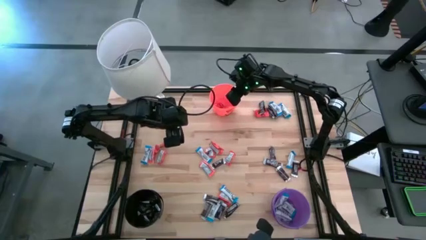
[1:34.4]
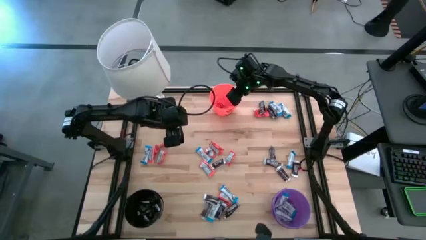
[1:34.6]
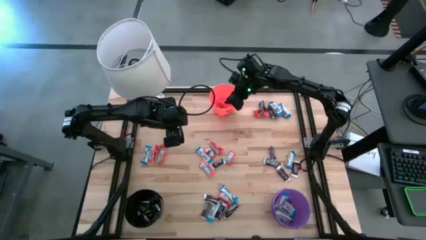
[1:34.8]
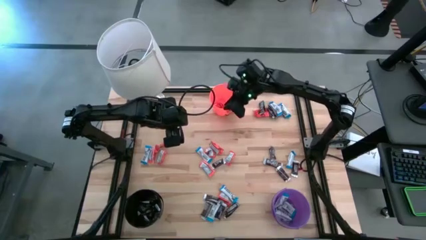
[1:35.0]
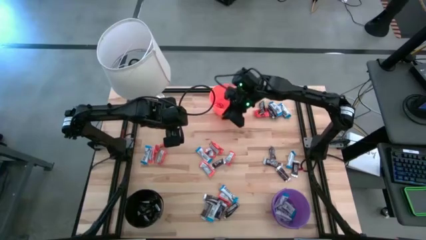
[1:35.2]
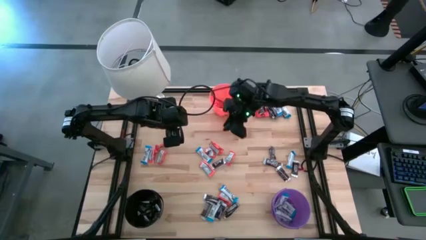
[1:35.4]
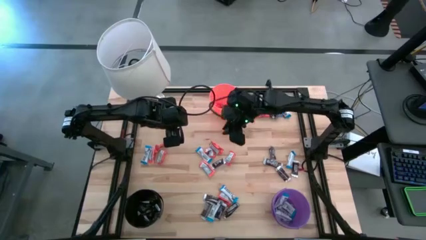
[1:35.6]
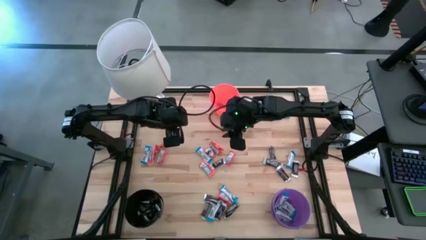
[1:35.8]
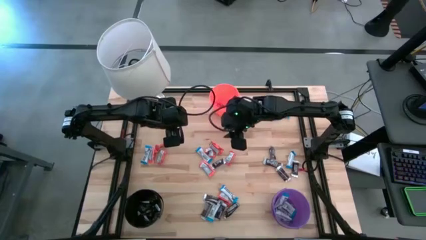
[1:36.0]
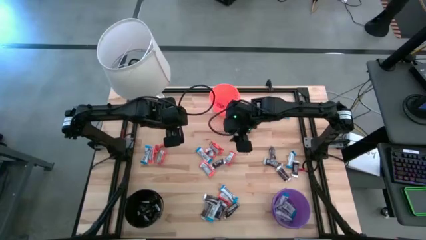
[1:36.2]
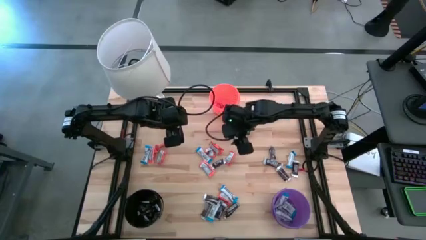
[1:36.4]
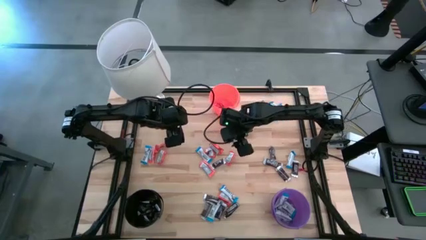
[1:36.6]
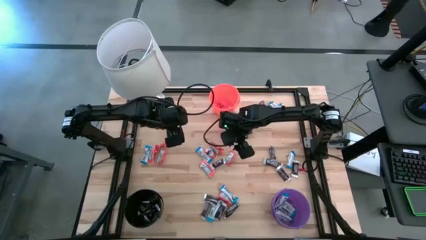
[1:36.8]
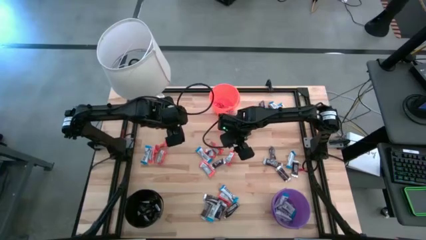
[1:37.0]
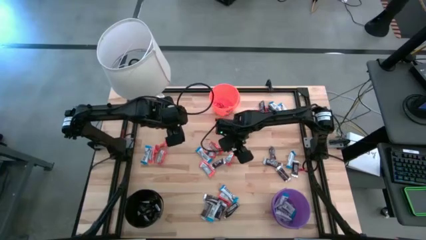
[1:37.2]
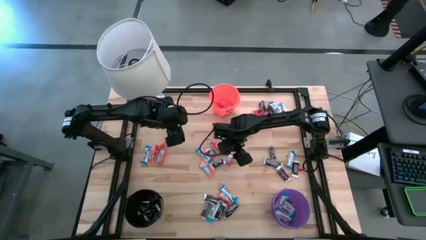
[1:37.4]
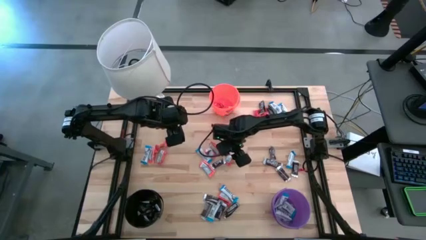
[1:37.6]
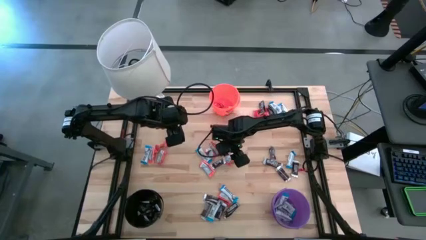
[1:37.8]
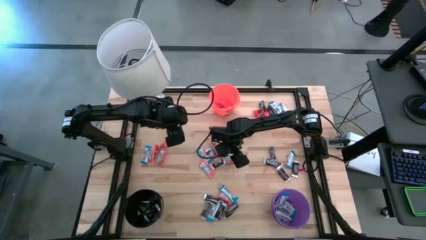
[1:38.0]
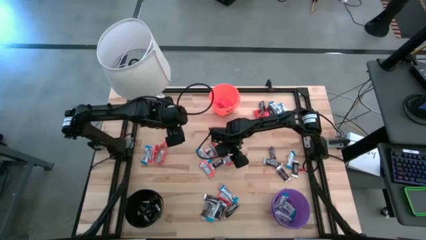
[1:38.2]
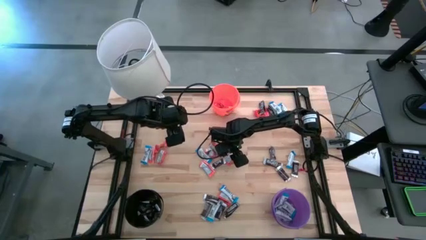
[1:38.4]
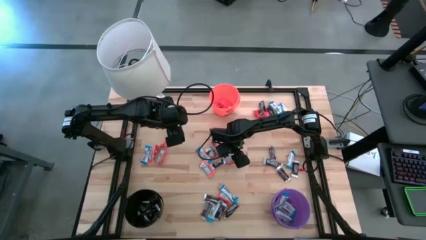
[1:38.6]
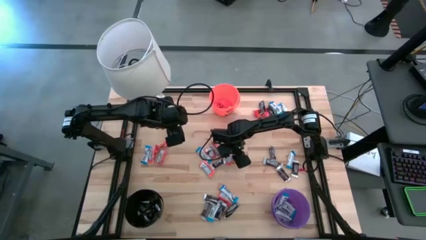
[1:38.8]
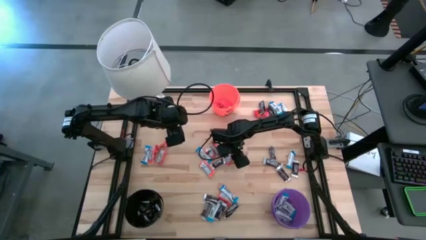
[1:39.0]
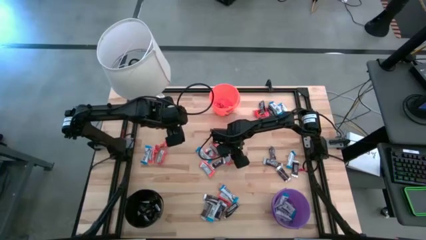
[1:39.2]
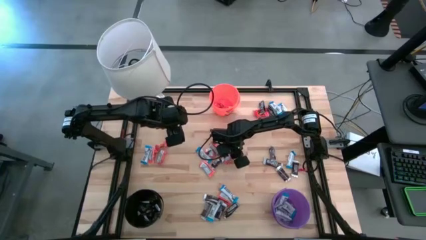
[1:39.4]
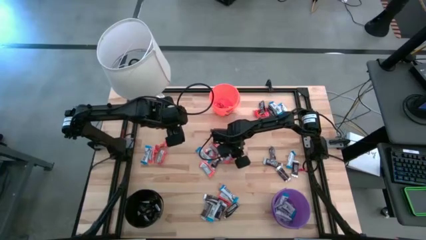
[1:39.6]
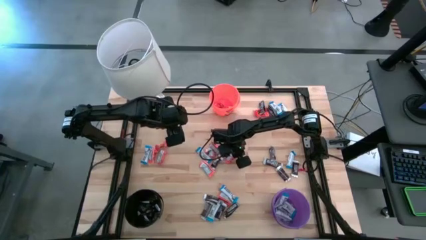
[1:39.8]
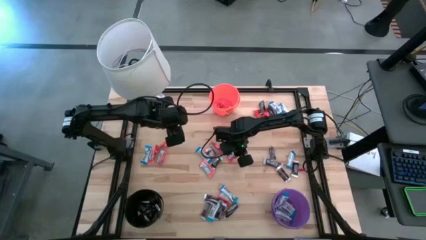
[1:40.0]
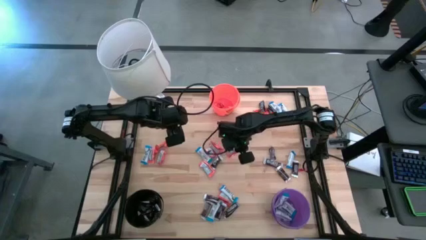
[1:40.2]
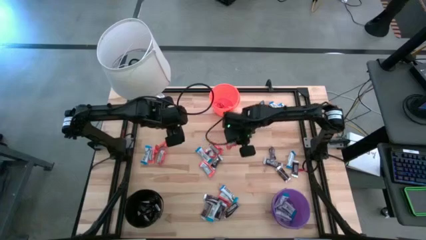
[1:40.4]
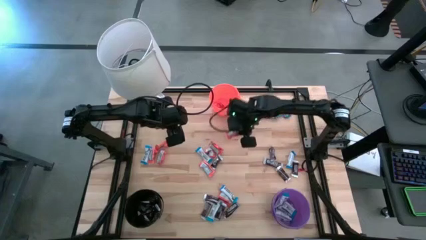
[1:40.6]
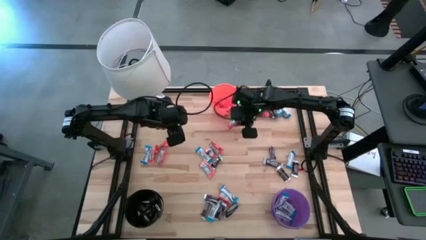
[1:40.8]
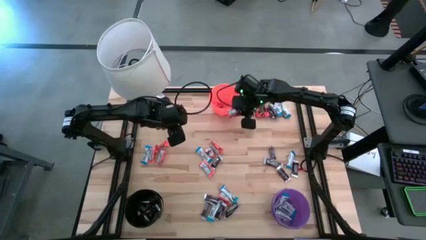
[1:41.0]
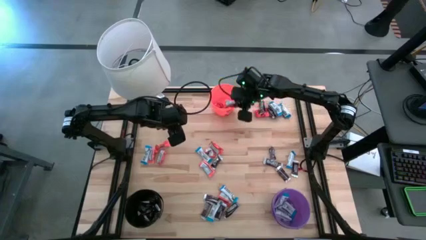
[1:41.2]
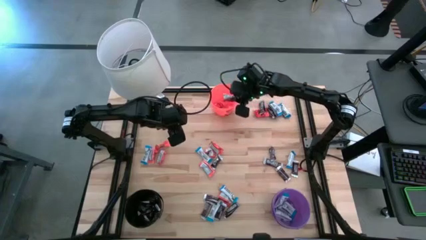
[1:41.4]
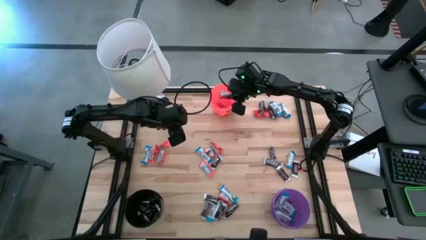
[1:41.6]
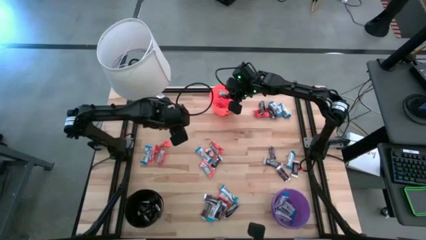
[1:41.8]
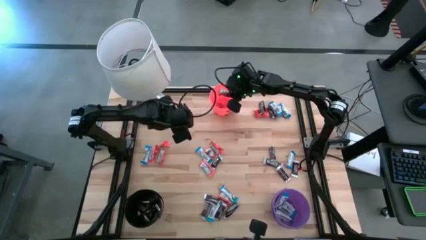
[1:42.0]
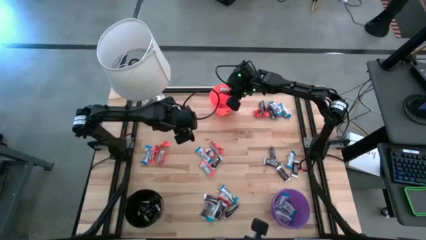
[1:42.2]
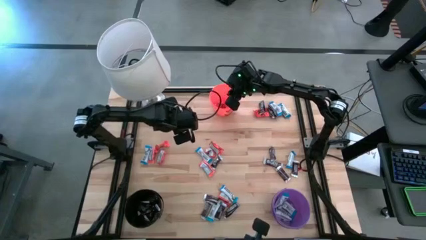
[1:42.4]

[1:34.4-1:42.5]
Task: Organize candy in baskets
Put the orange chocolate into the orange bucket

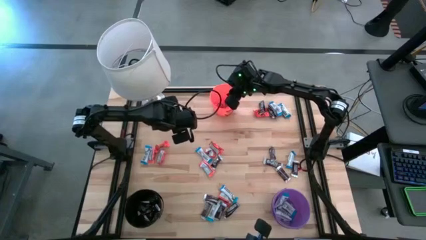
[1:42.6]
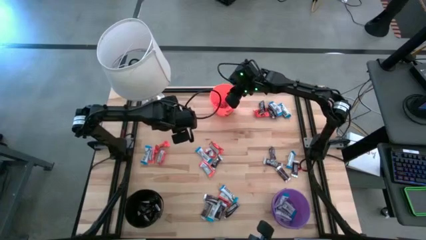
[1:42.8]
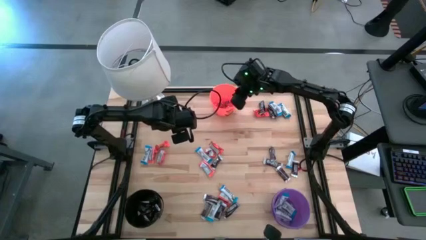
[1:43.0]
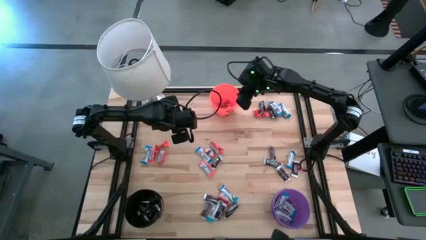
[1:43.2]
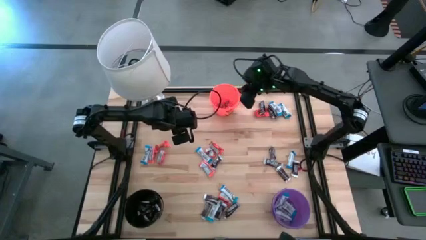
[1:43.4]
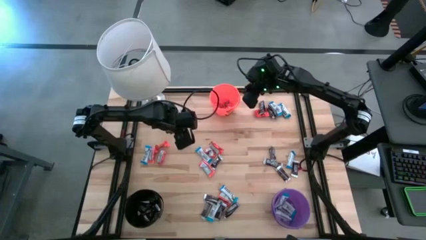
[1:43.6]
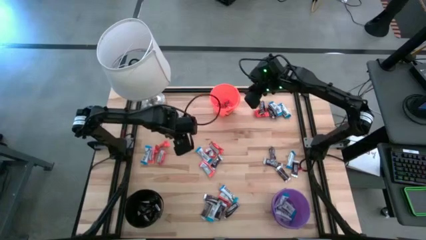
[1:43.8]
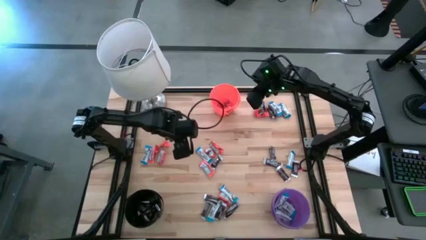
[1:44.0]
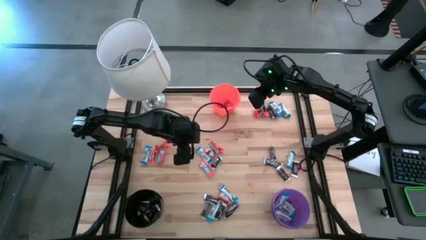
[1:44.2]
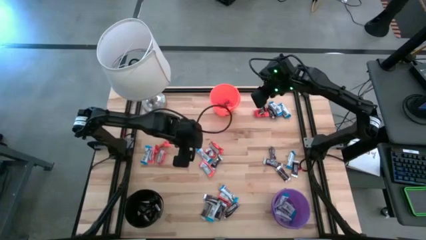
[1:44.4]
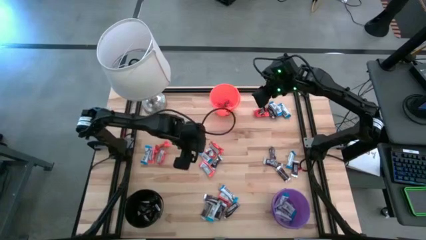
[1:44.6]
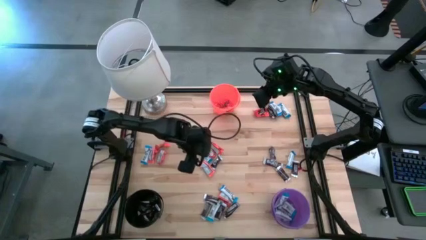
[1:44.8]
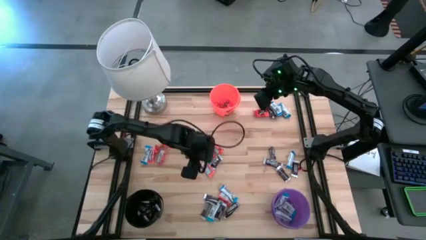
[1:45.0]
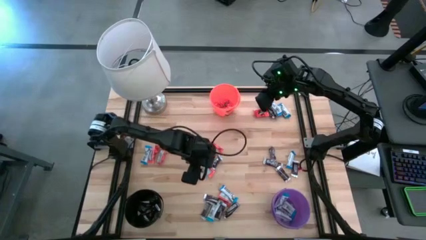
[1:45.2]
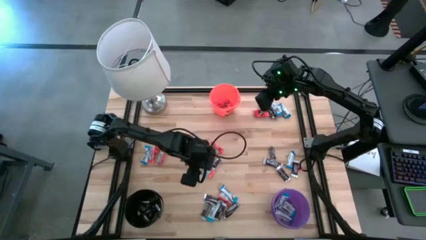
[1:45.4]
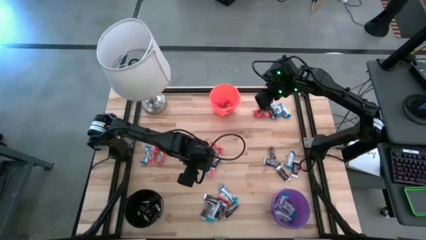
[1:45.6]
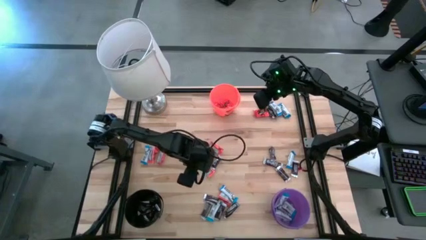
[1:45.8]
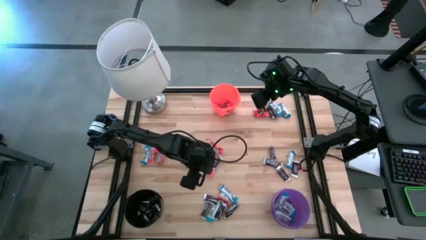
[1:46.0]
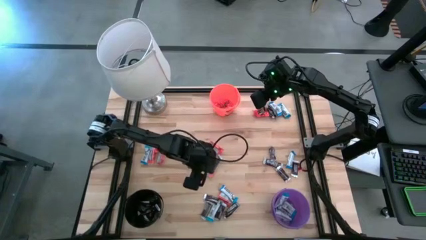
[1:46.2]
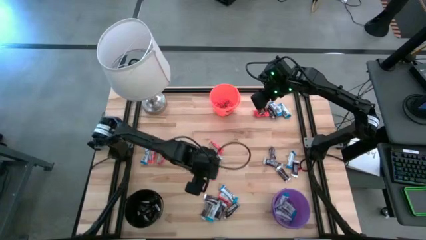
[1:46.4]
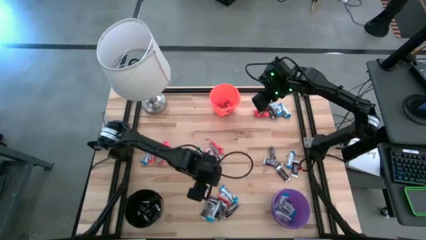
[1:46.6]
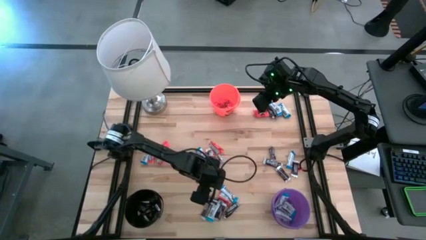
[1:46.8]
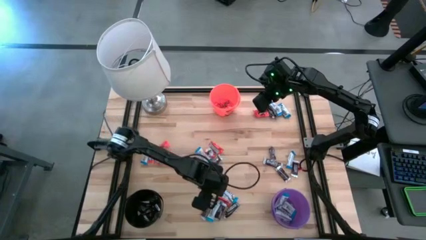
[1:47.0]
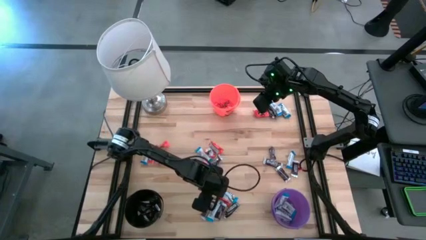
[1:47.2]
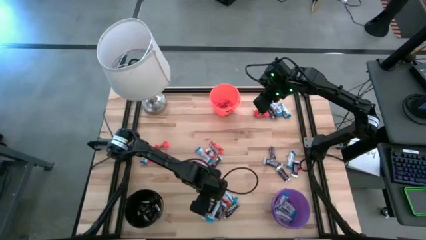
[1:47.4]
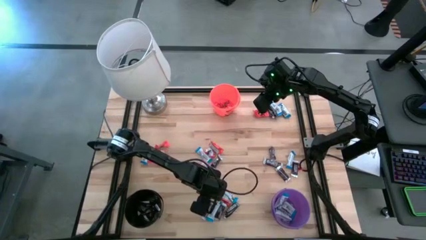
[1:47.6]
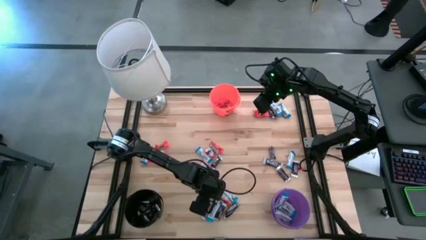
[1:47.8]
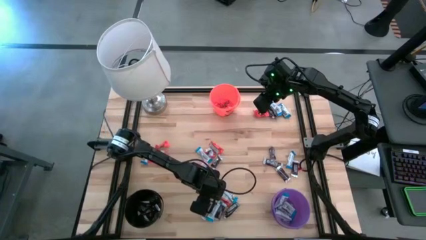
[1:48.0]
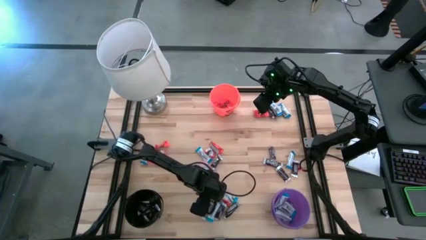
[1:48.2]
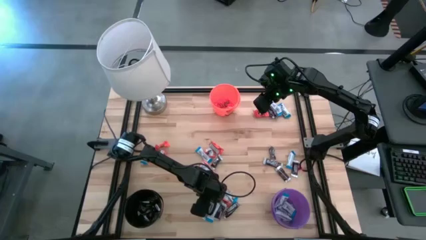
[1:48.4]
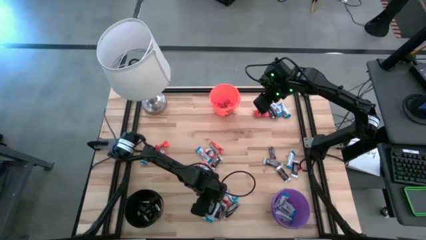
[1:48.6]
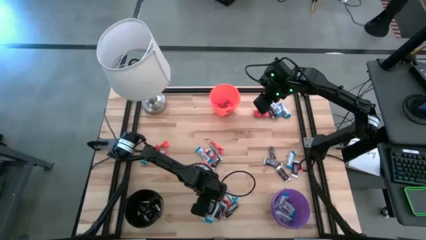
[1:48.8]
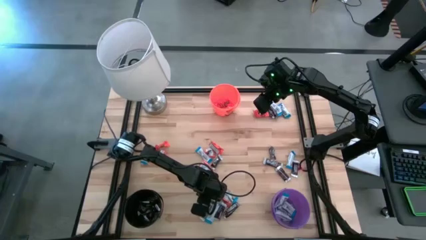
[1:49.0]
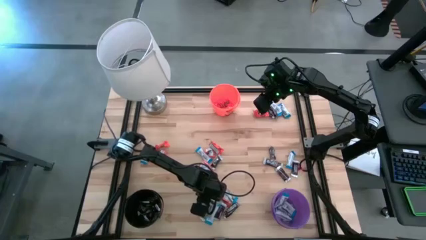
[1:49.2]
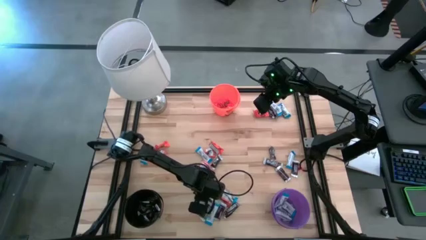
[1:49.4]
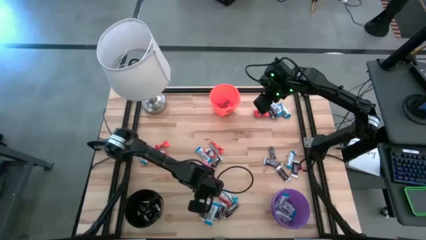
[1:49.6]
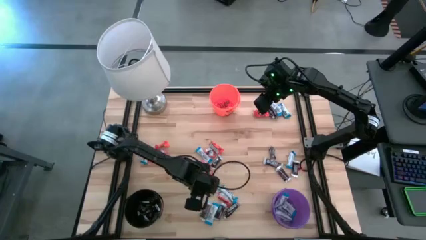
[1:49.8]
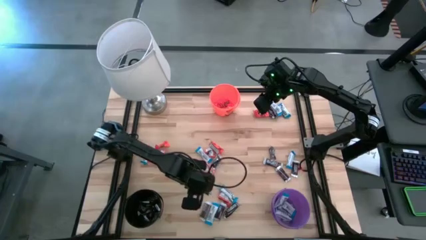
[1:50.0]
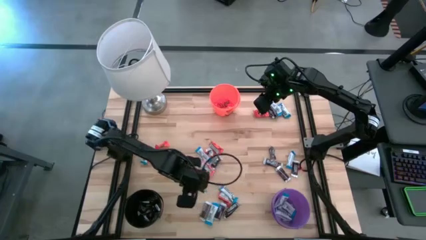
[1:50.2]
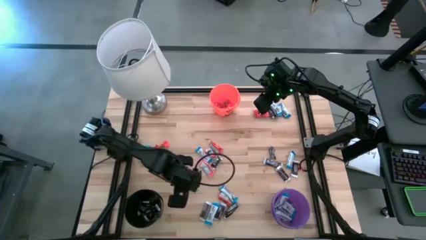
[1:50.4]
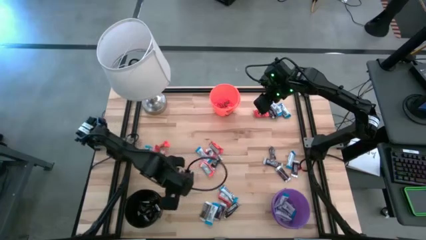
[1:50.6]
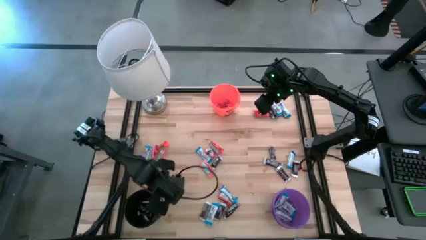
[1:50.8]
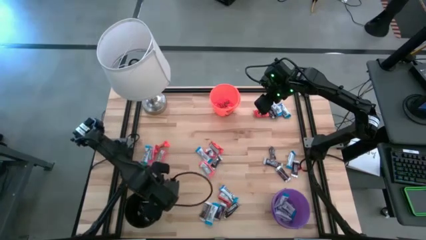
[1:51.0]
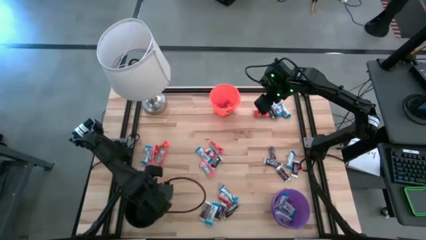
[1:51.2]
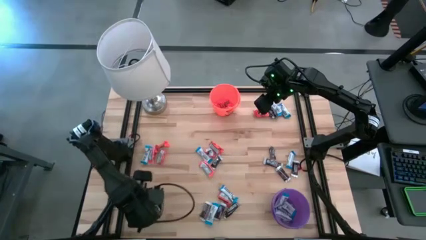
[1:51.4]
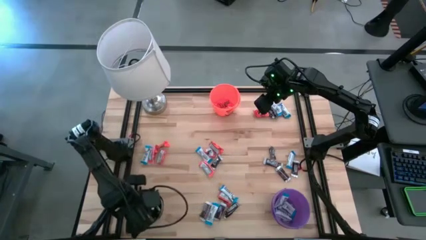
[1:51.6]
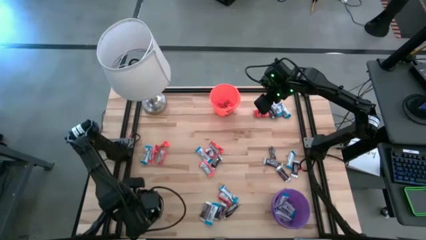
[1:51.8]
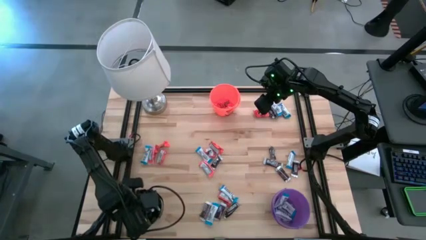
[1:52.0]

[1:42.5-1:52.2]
Put the brown chocolate into the black bucket
